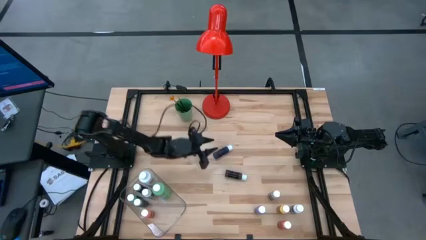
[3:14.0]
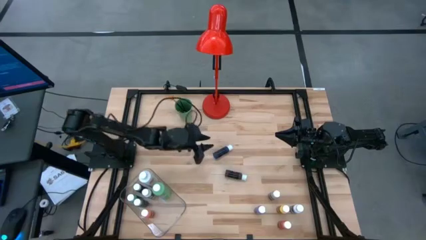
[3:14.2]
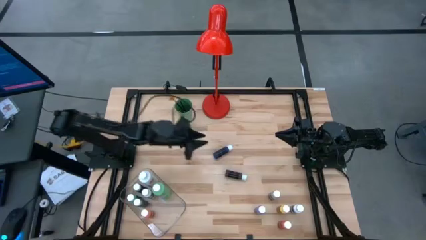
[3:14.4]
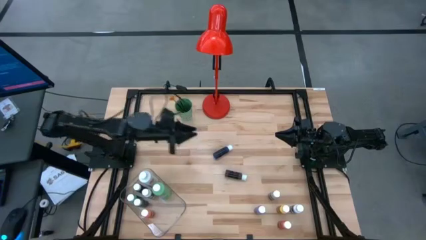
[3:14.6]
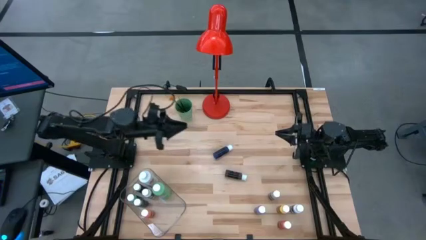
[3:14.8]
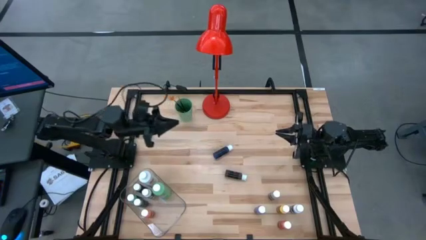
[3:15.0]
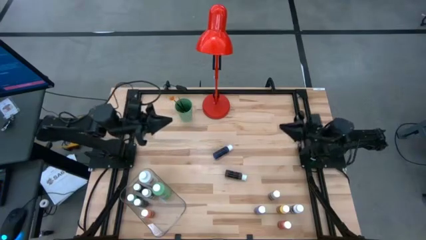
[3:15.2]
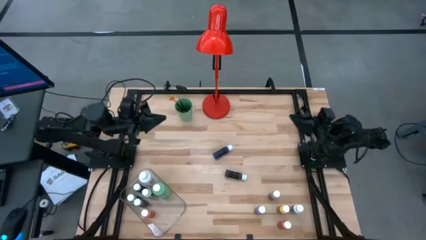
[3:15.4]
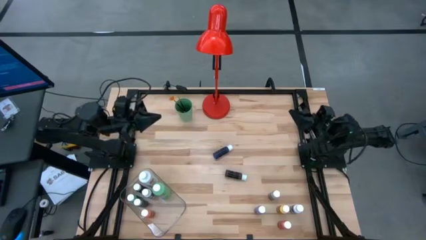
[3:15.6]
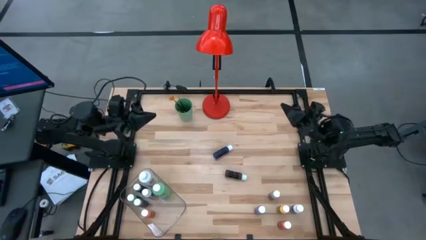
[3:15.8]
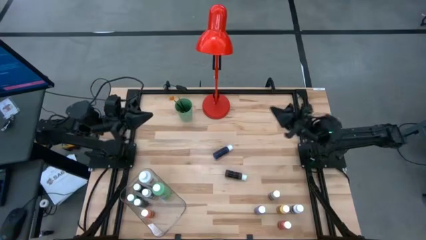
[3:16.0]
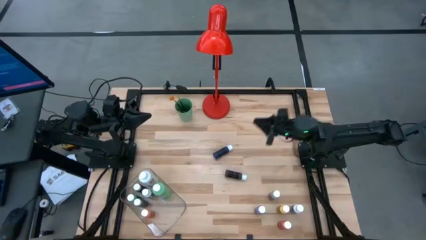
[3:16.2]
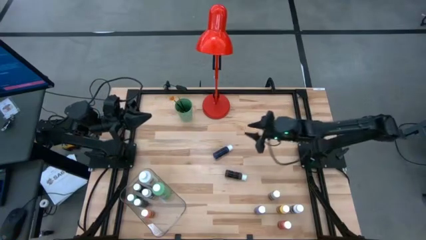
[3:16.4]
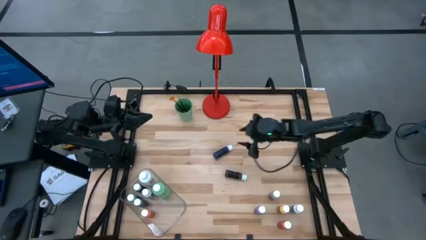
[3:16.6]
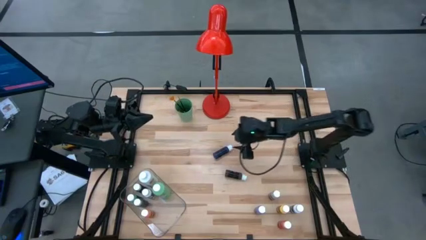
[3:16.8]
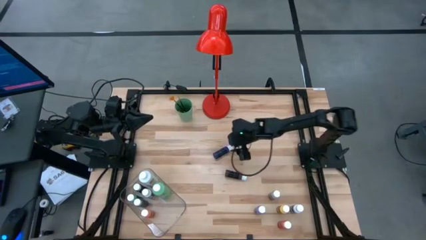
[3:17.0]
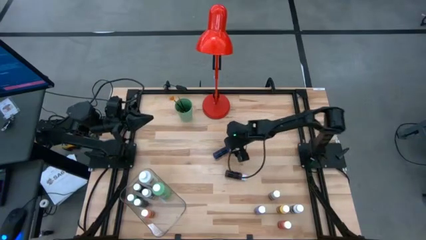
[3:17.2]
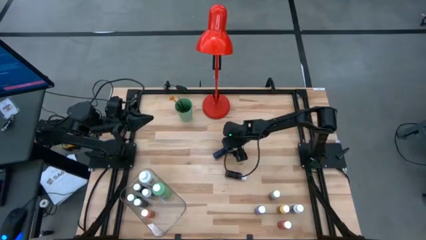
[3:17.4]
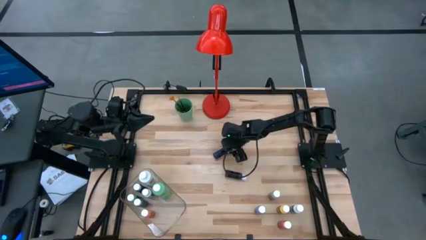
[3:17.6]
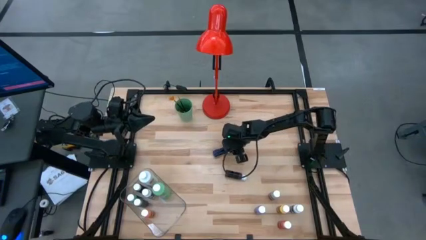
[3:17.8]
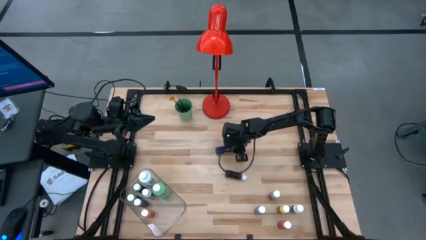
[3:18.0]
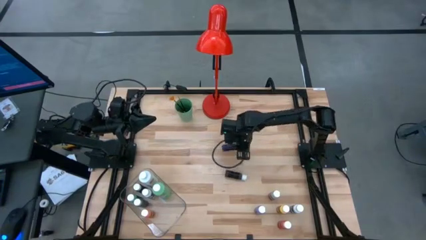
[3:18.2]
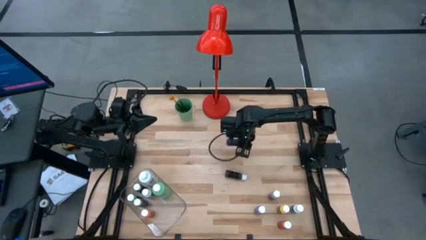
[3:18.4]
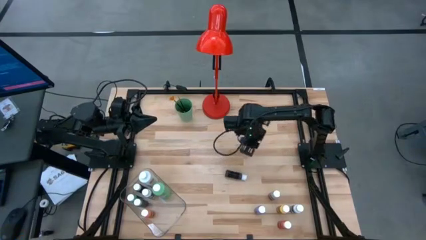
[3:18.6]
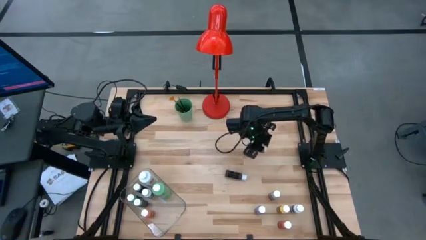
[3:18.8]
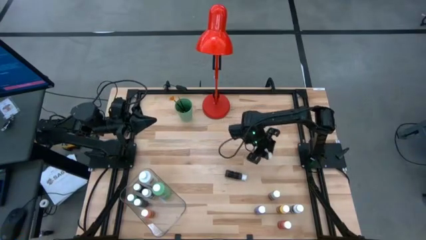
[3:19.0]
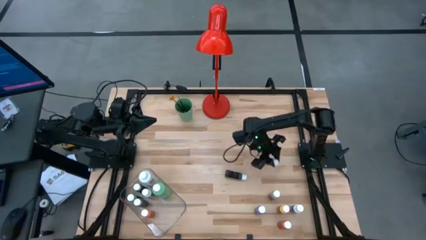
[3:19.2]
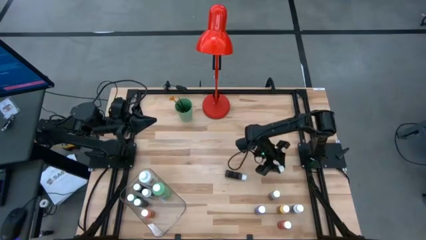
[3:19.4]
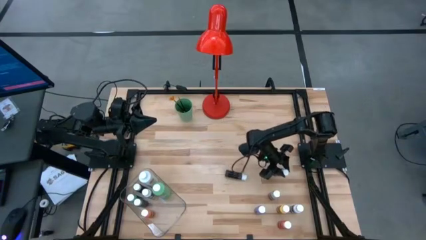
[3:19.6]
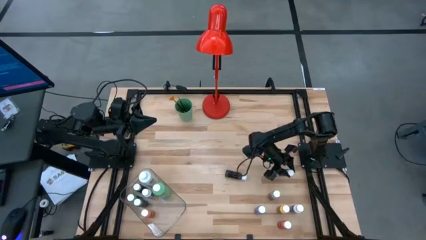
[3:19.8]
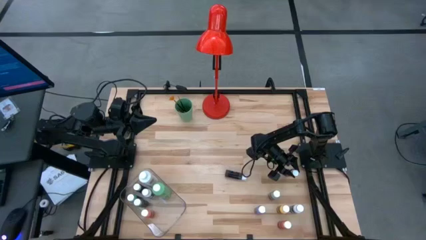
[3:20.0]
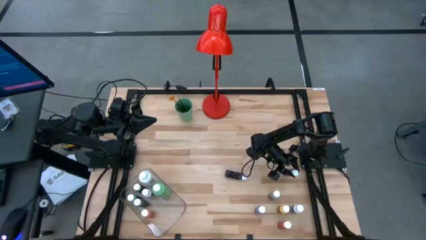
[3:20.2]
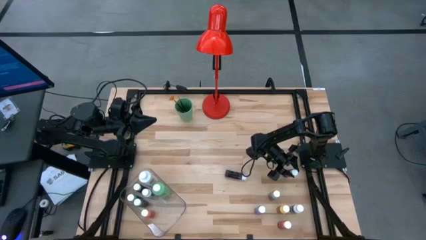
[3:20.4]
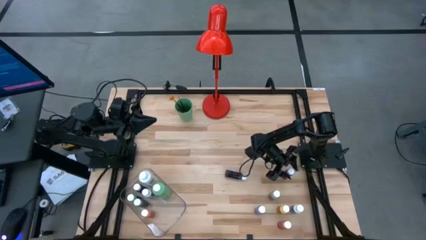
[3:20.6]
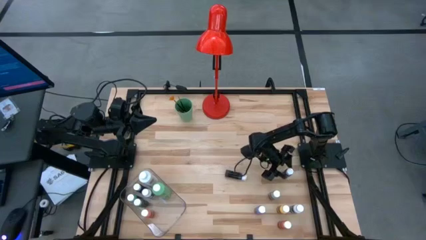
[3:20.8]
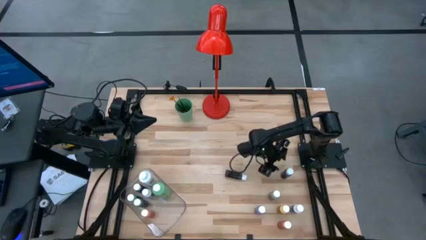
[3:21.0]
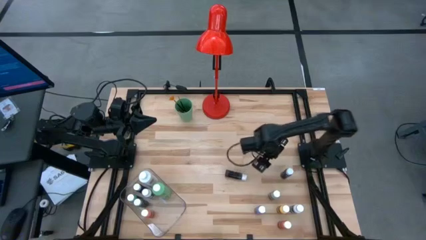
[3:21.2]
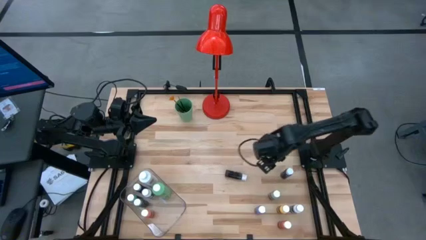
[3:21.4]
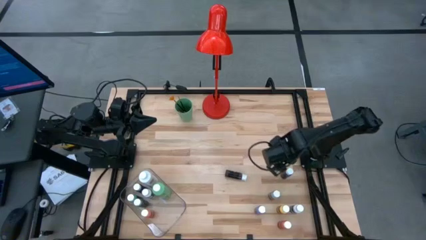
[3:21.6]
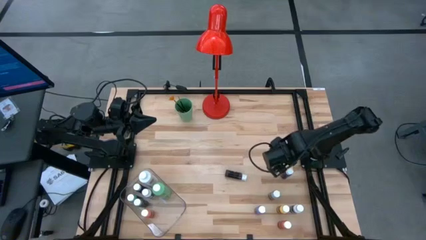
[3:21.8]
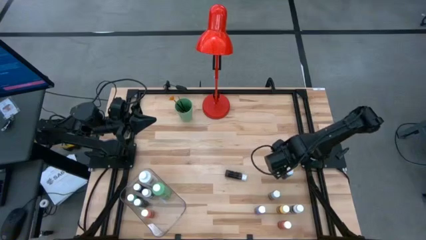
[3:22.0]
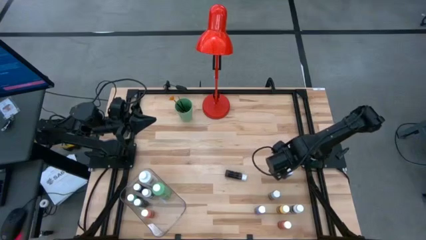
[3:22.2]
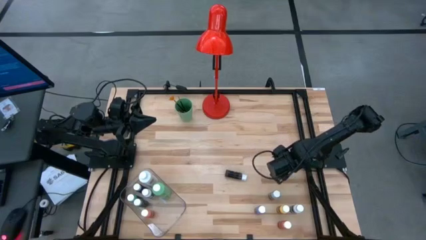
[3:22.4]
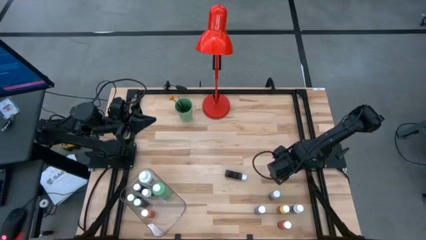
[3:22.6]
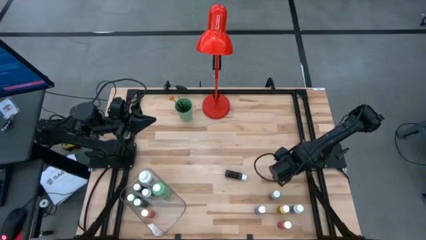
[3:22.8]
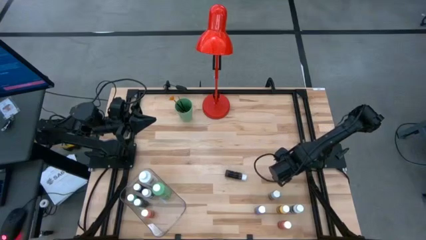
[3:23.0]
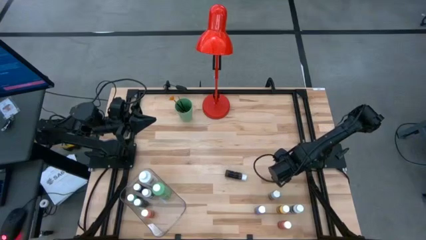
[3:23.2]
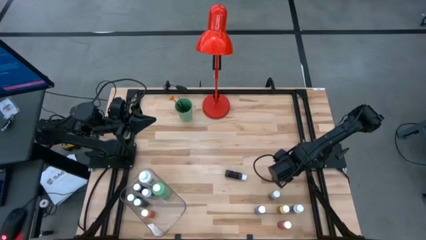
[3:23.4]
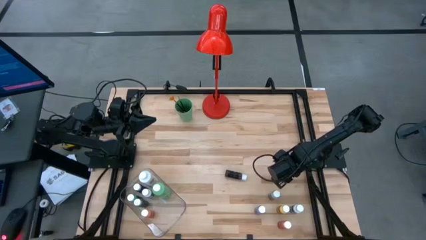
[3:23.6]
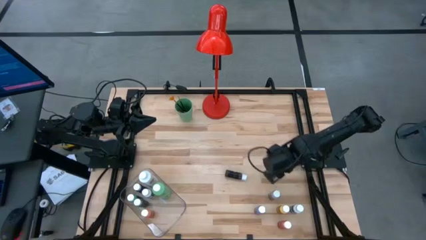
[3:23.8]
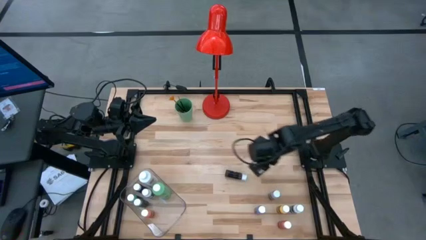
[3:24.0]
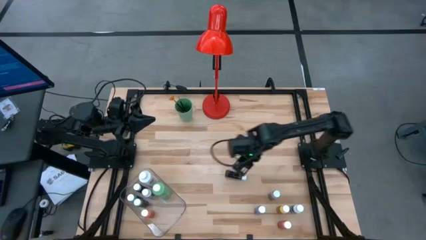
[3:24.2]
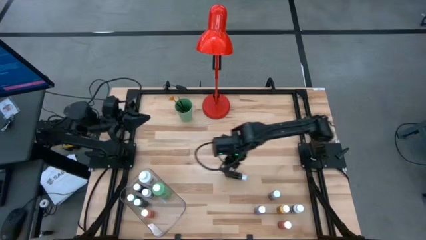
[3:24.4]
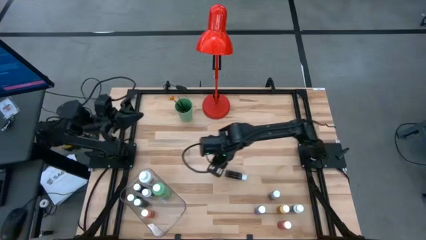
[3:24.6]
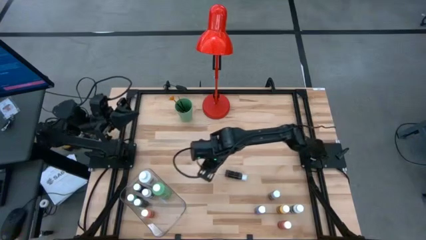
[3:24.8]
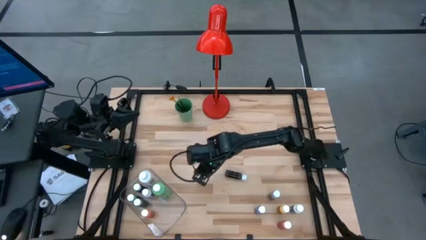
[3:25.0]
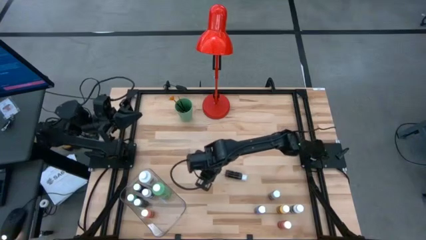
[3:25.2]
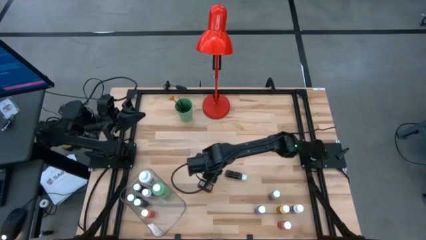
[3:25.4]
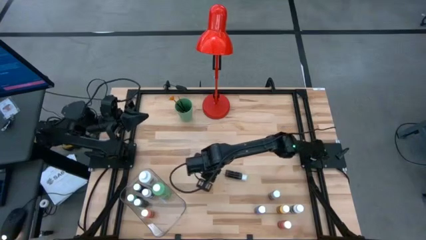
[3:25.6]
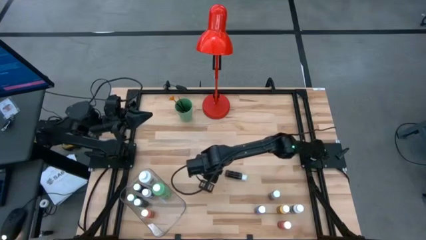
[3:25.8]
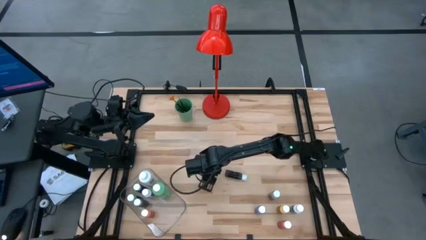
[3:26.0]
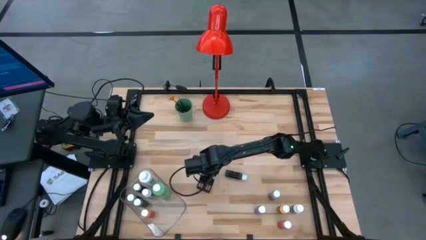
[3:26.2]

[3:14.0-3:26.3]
Task: Pick & Place Paint Supplies
Adjust the blue coloring bottle to the center of the table

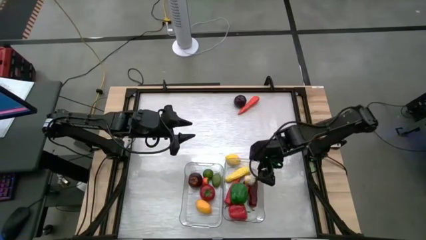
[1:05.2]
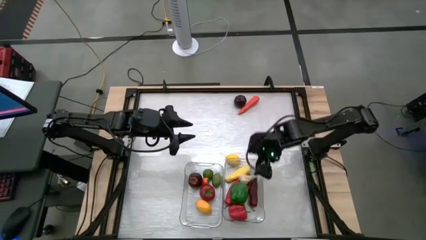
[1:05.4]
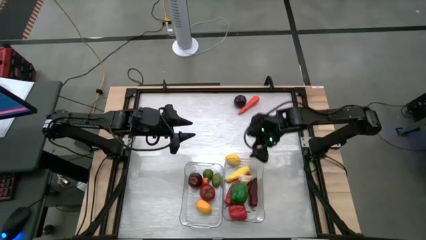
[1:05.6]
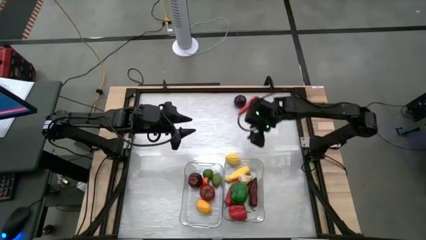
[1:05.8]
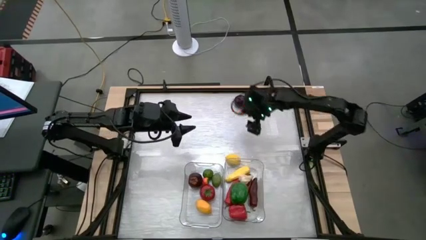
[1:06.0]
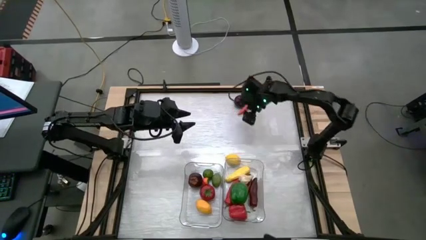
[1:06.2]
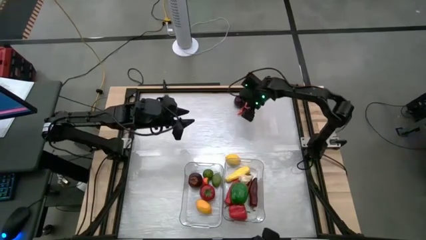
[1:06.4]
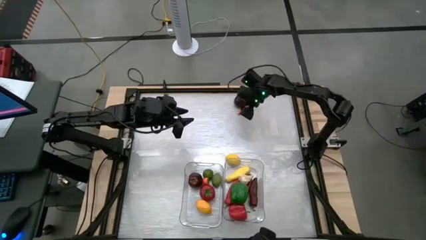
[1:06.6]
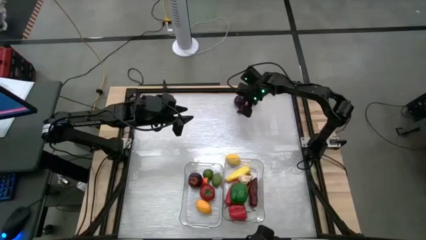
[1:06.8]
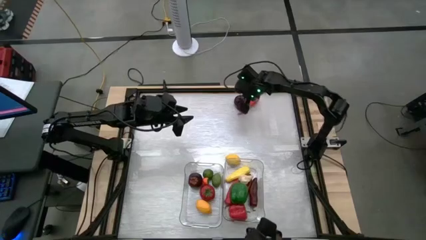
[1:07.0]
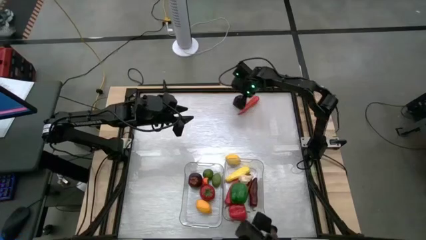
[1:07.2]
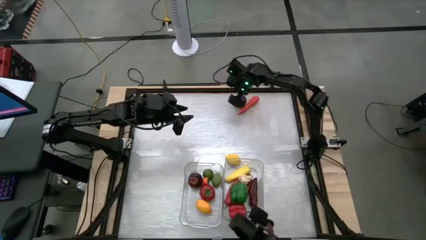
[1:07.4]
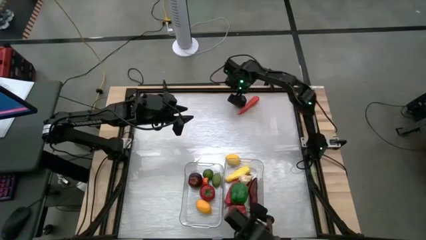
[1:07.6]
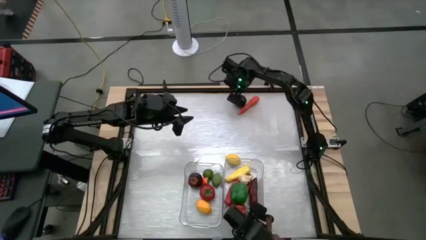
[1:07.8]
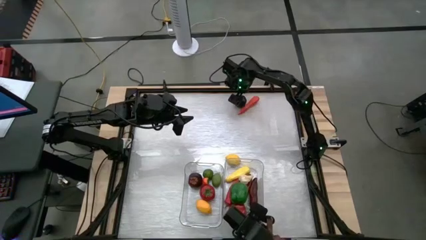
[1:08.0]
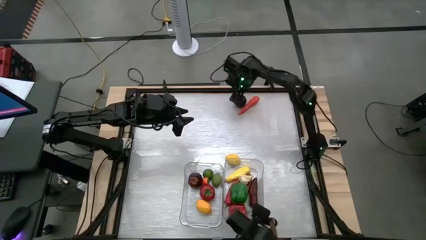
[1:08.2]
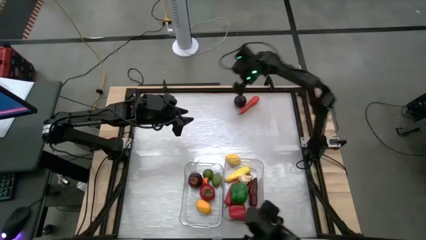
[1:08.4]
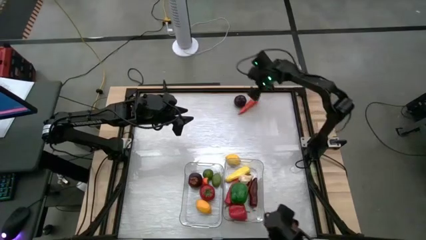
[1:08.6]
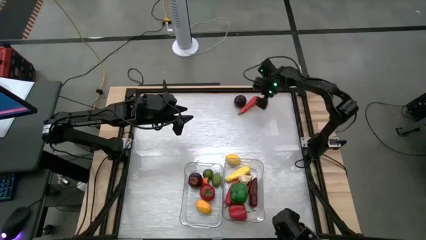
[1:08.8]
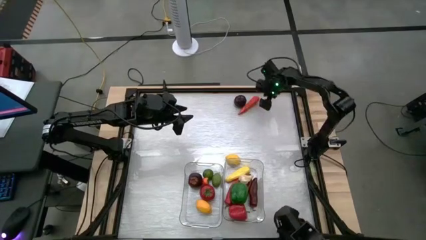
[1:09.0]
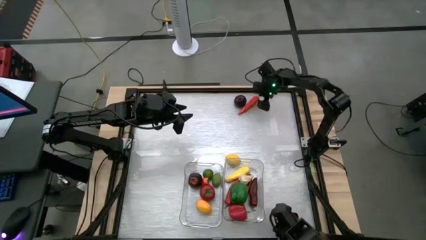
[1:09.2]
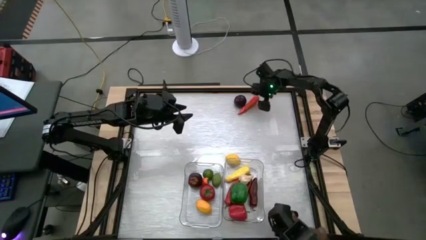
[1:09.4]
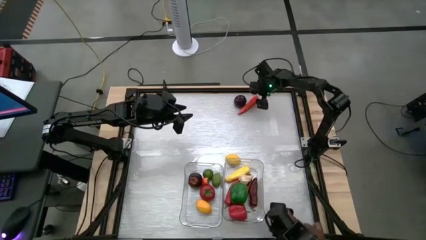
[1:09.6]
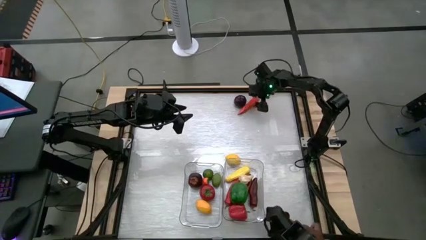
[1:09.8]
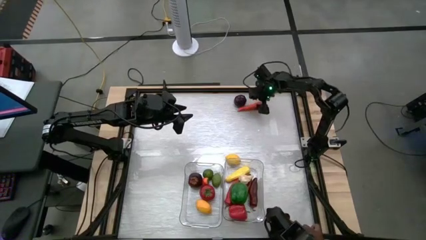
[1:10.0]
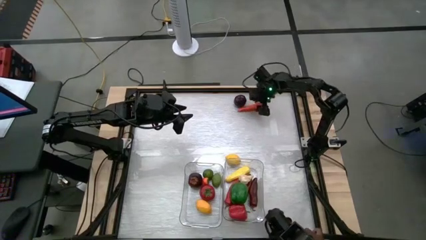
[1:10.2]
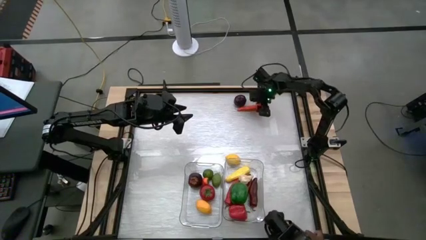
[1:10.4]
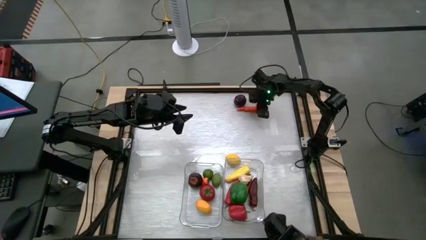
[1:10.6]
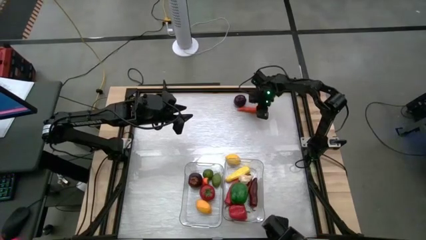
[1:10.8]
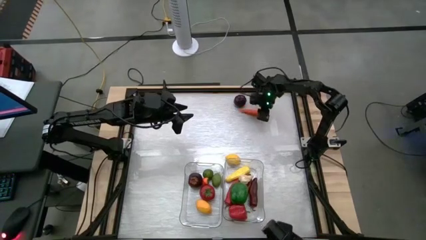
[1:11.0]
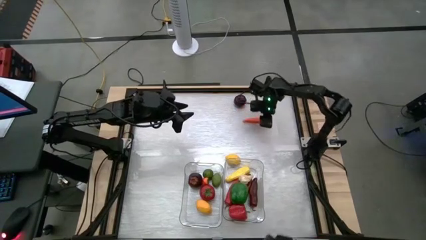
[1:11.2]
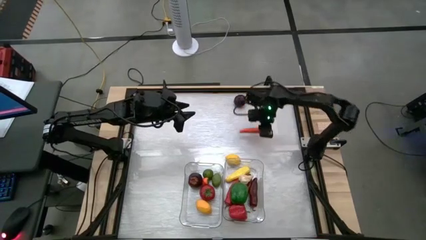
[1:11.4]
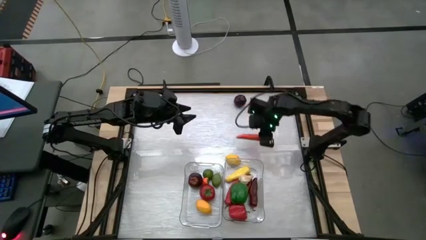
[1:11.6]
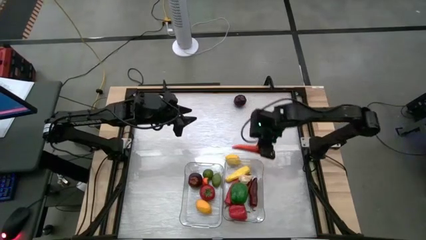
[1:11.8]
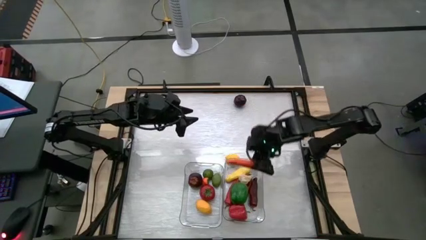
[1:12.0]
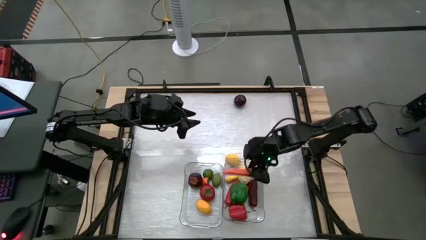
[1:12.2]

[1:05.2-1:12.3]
Task: Sort produce into baskets
Put the carrot into the right transparent bin
